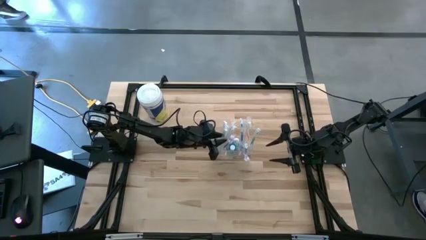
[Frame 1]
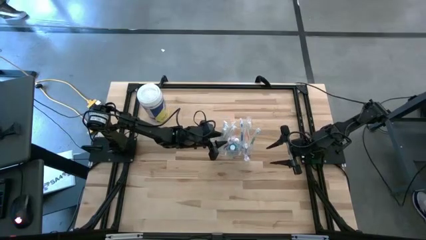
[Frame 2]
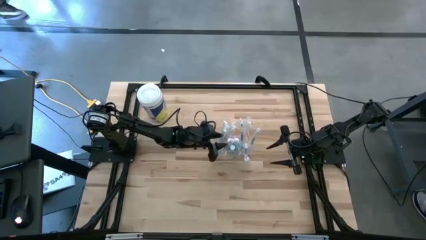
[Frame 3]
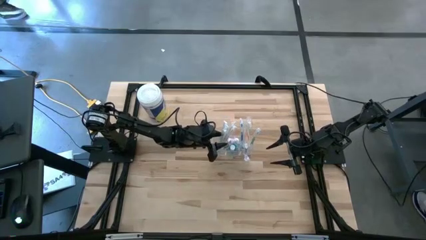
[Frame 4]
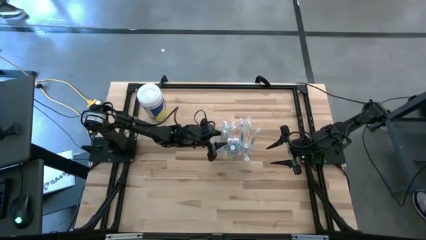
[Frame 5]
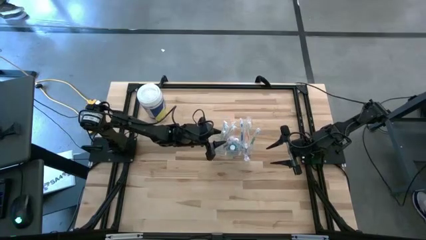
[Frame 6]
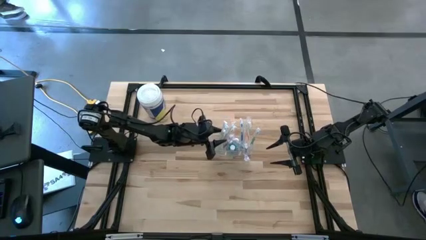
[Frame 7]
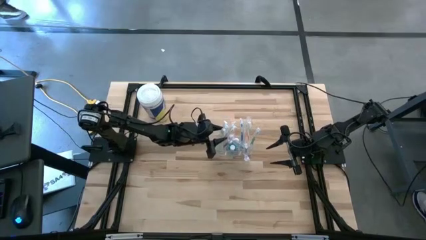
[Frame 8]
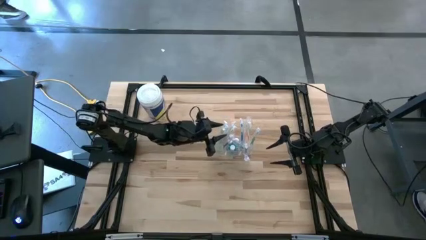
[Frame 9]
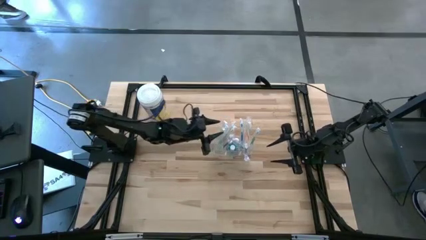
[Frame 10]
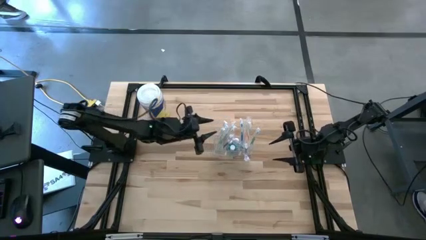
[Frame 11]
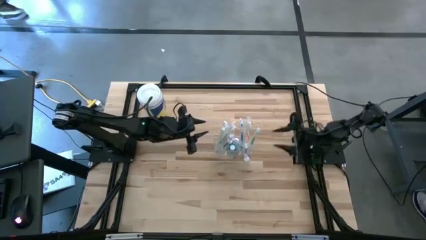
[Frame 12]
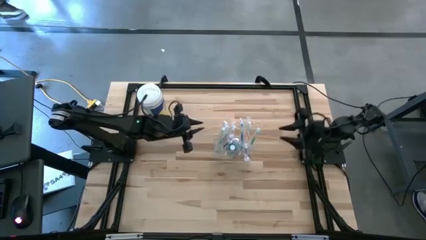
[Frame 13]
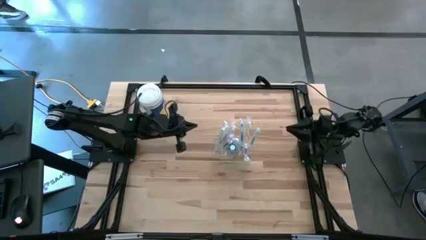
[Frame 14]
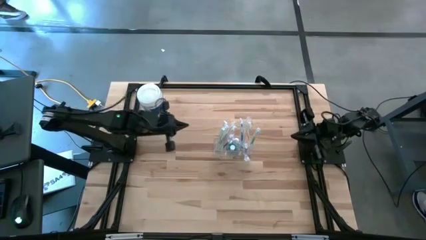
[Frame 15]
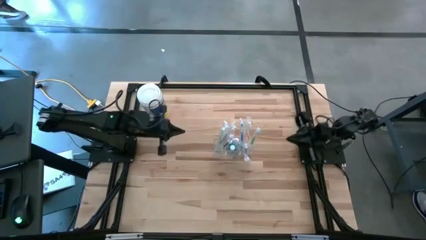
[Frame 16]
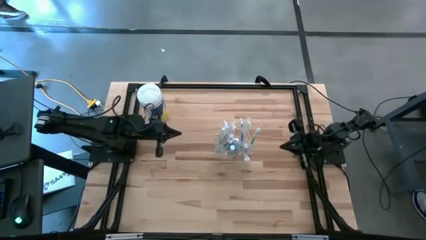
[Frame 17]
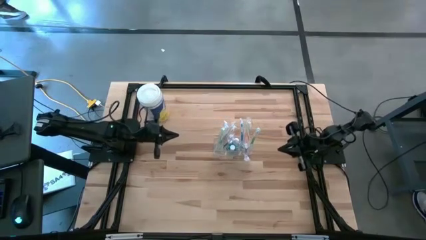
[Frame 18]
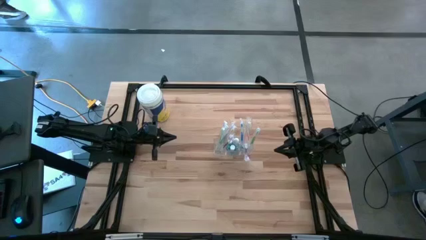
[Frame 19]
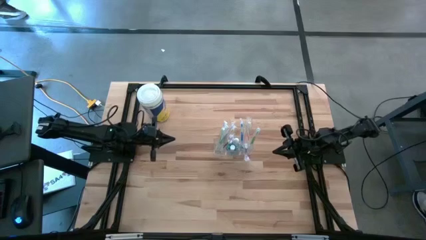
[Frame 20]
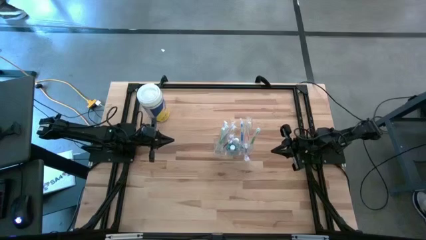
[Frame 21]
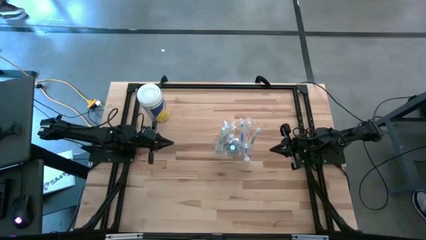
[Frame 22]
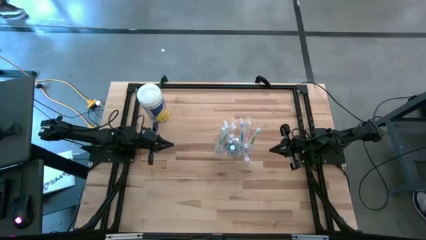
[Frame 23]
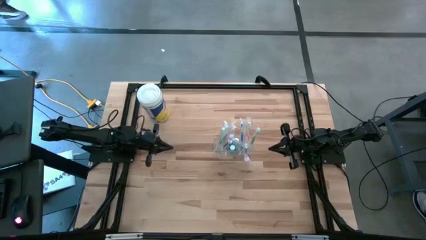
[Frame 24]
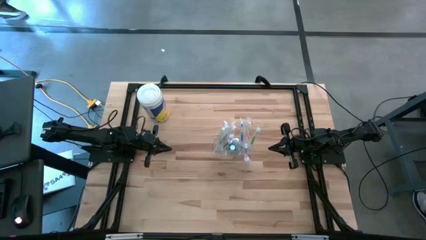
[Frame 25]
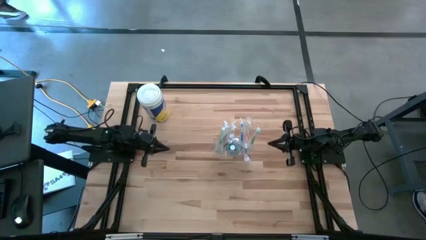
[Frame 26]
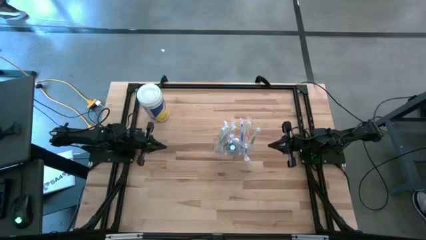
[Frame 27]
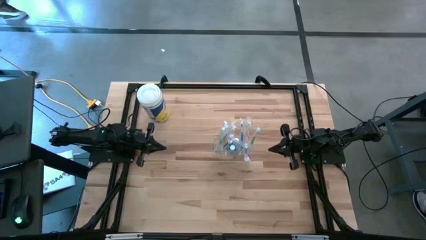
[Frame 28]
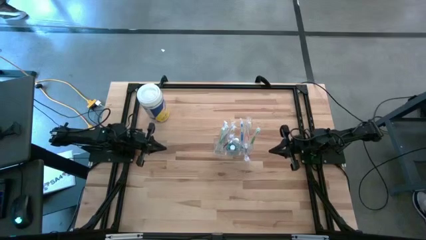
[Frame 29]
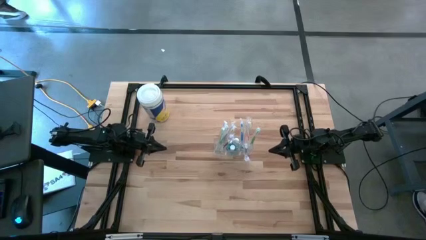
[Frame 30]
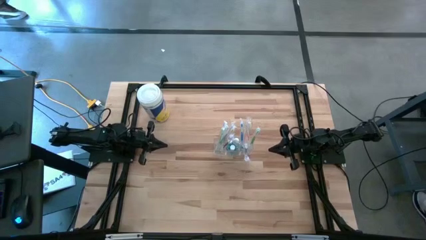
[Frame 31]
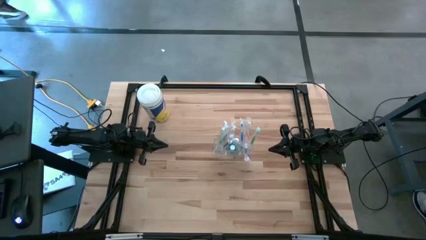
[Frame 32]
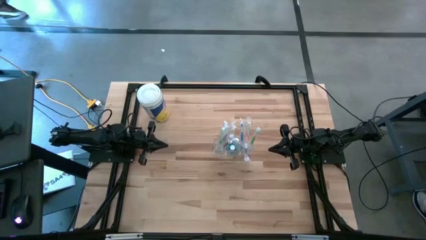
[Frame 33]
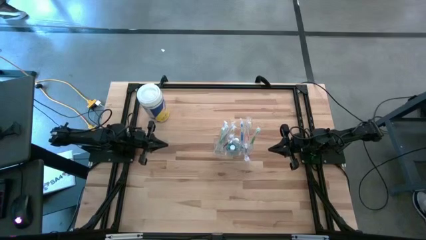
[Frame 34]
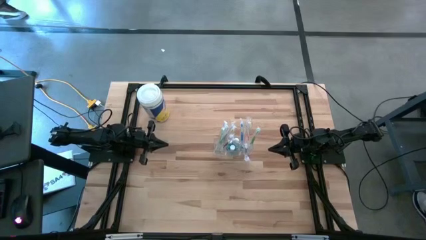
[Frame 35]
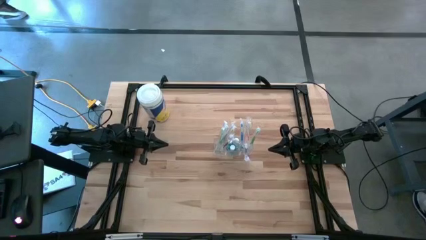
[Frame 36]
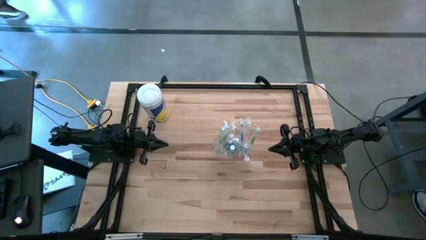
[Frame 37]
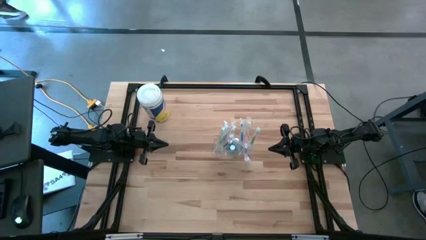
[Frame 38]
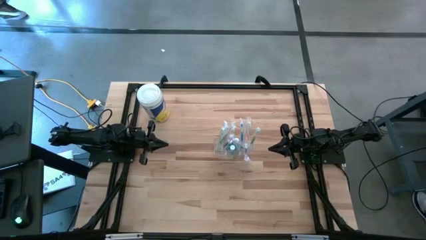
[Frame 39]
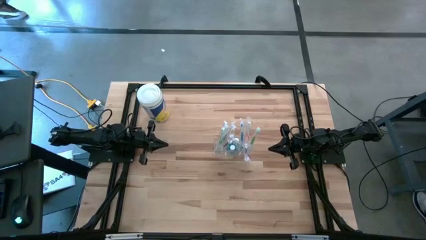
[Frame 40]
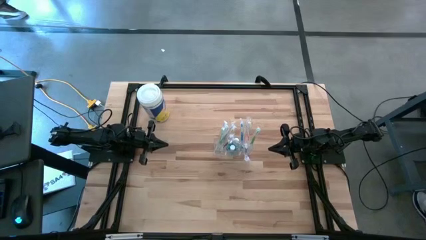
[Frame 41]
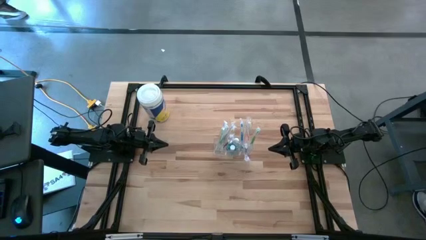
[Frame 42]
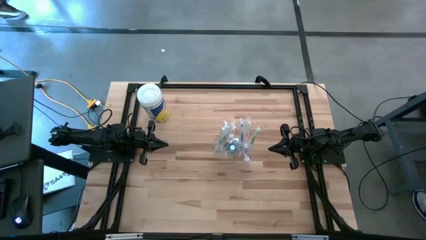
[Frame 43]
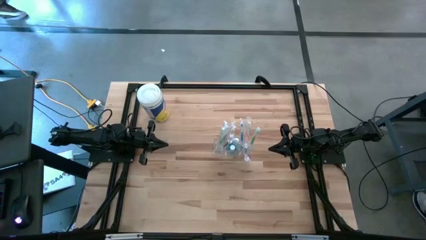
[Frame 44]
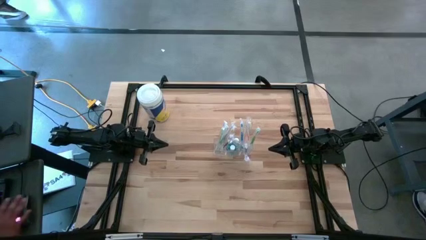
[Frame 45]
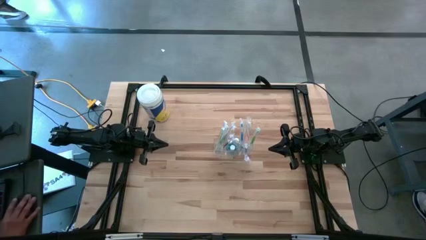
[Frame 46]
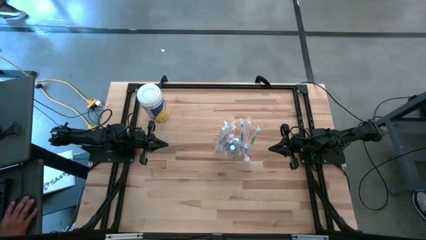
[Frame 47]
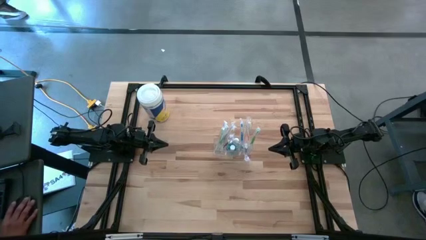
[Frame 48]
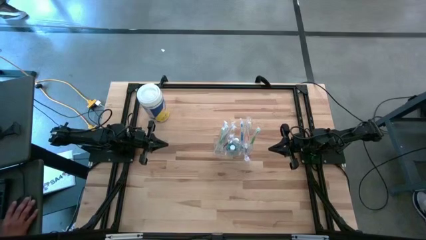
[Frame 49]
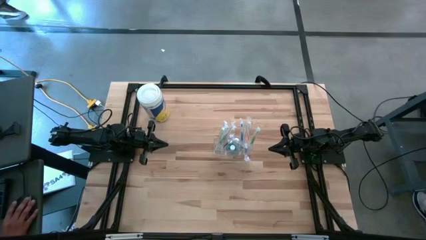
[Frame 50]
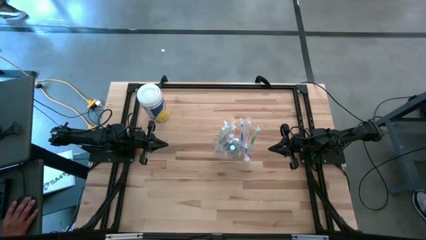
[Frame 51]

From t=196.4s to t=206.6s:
Task: Pick & Place toothbrushing station
Return to Home Position
